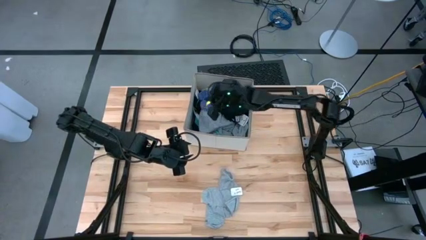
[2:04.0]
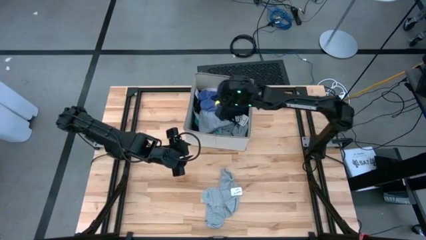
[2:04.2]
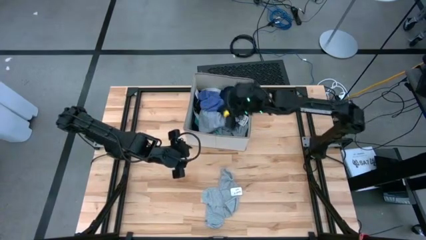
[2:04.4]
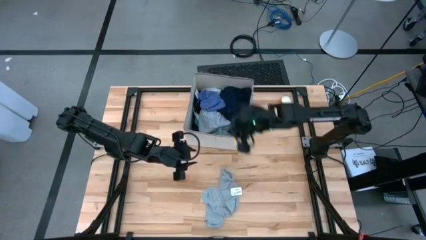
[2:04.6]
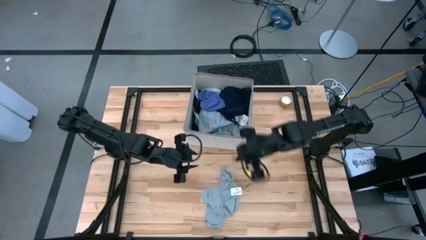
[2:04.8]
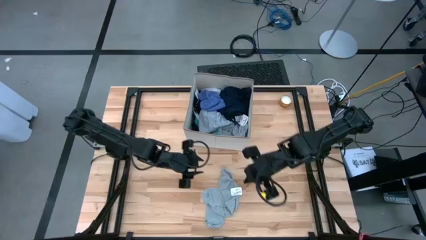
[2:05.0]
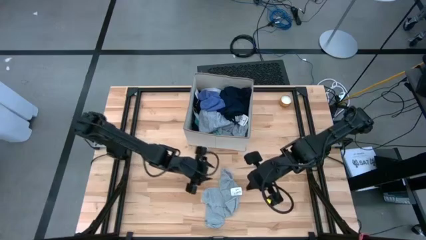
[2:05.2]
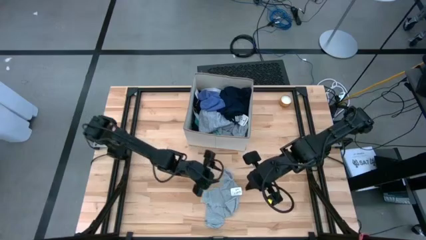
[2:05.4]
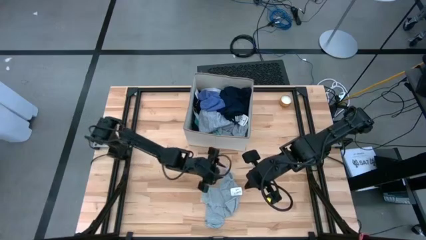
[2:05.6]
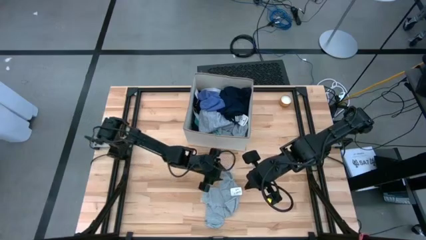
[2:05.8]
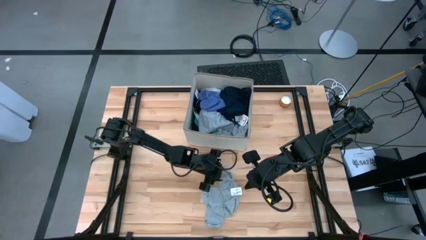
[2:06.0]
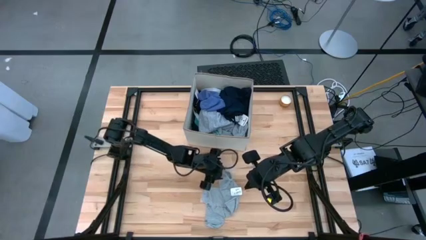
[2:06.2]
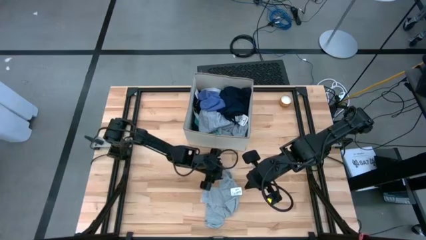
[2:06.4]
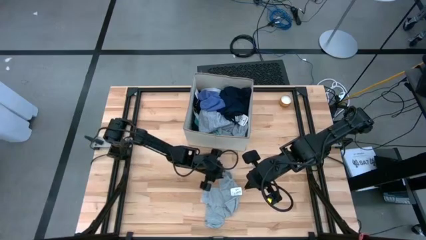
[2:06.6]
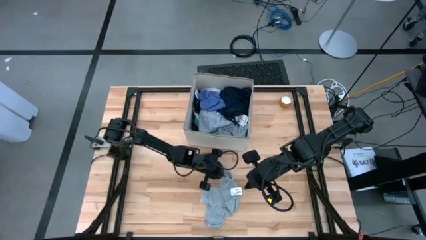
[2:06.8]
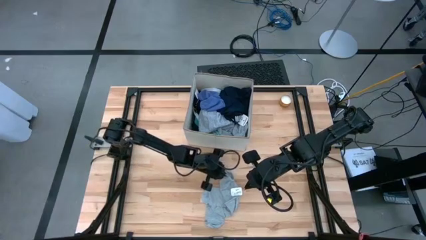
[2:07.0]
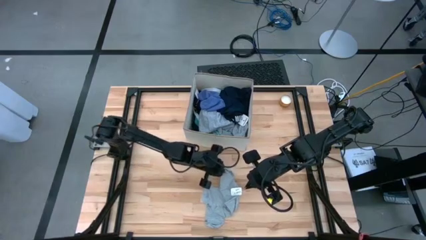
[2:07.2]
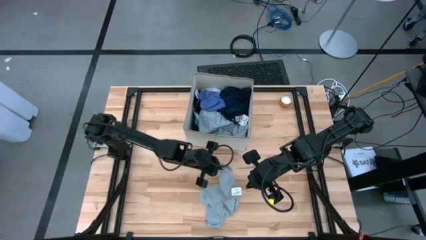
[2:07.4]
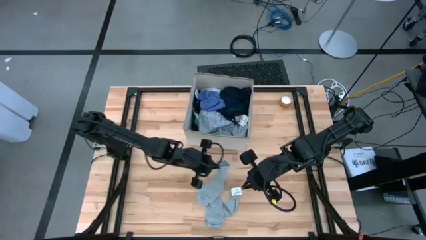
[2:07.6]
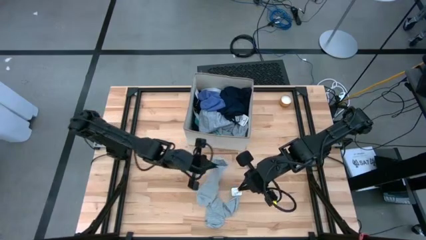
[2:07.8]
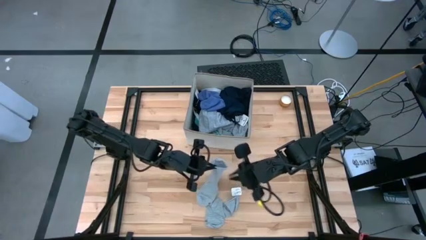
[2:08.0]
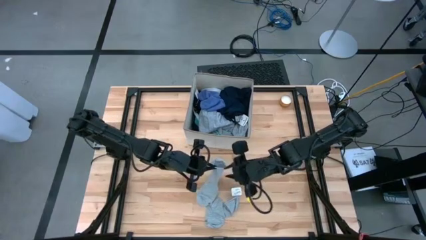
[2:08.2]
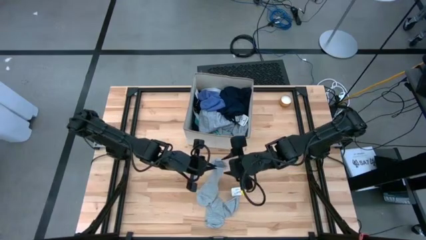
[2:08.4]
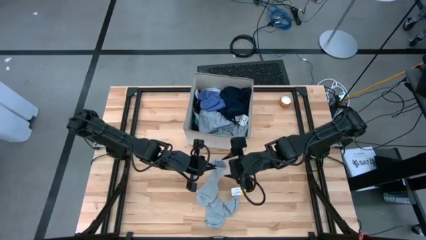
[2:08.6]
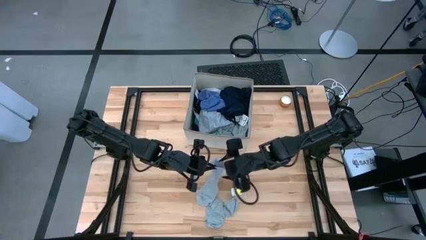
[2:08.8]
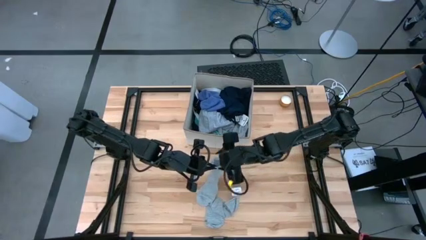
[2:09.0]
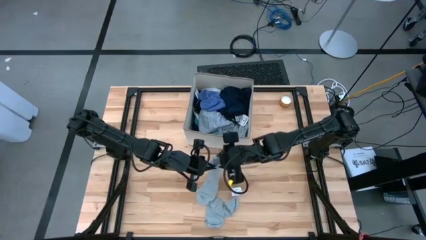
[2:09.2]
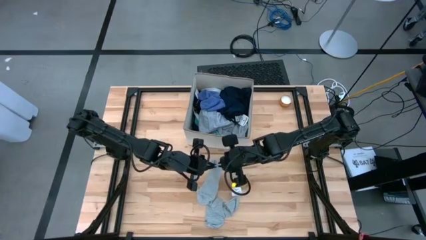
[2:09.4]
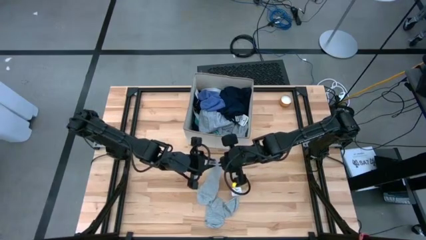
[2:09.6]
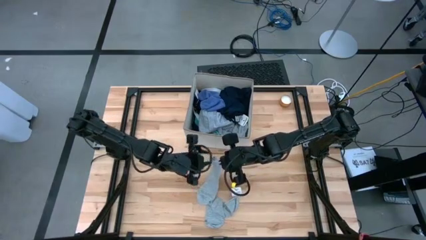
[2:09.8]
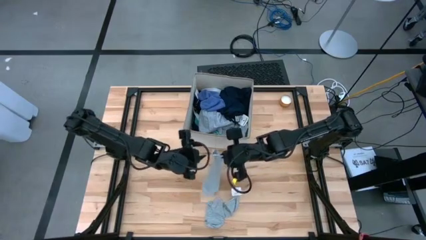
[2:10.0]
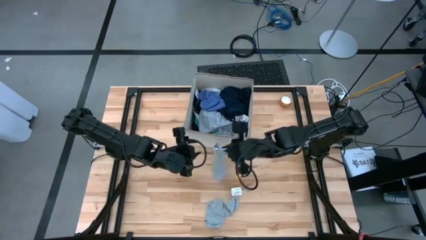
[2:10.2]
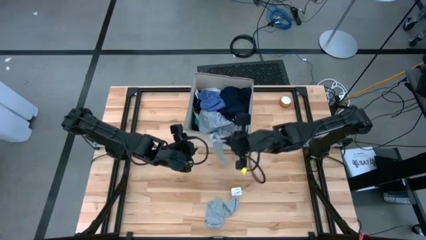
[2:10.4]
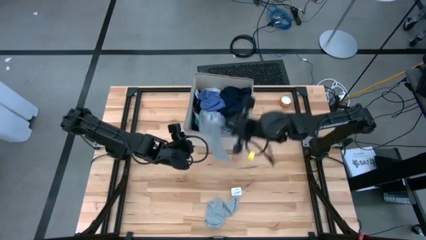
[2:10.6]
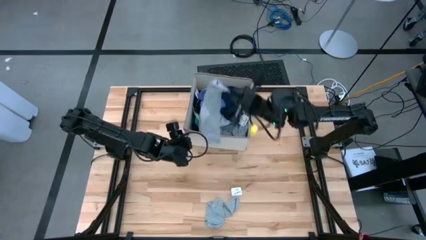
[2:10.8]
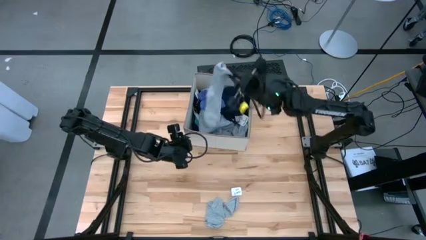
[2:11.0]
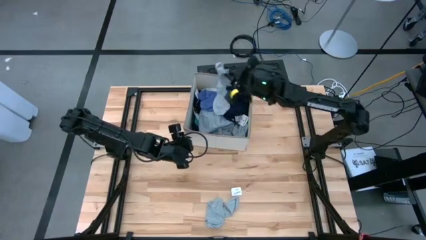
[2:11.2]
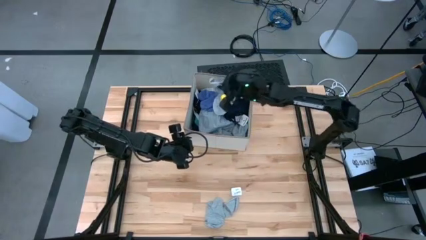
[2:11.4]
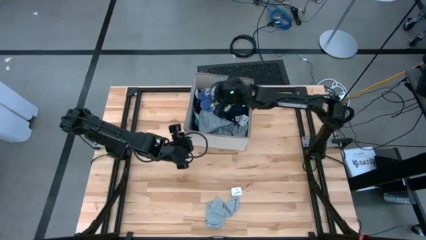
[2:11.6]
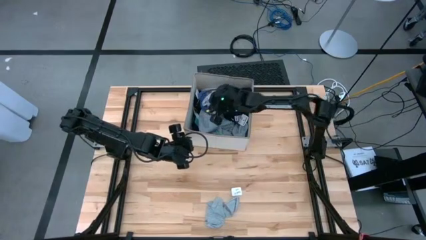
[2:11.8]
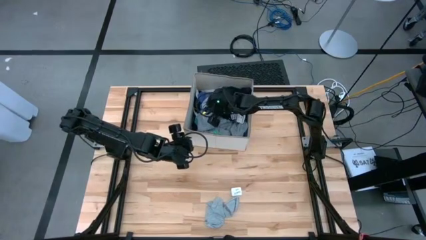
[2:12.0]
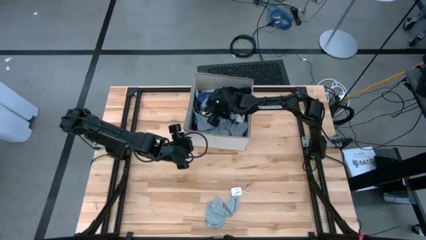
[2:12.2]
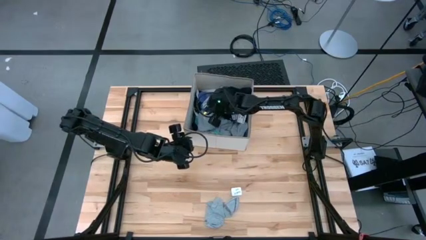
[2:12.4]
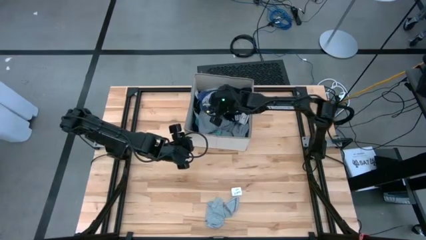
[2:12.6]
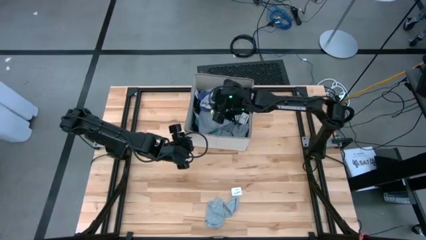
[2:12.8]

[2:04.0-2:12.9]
Task: Sort clothes
Put the top gray sock into the laundry bin

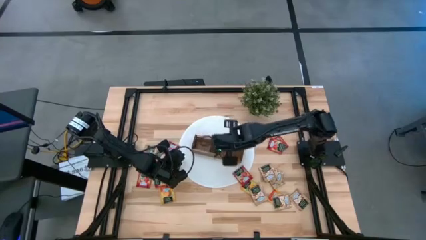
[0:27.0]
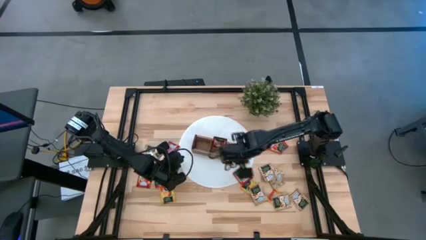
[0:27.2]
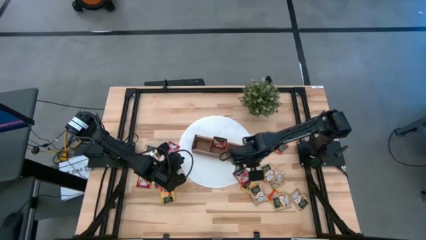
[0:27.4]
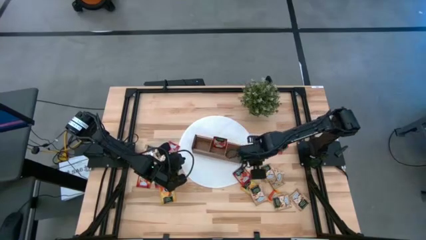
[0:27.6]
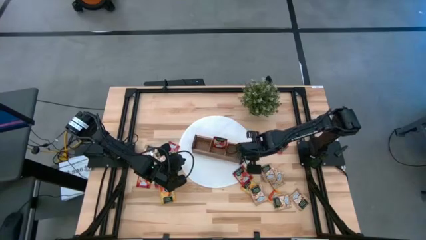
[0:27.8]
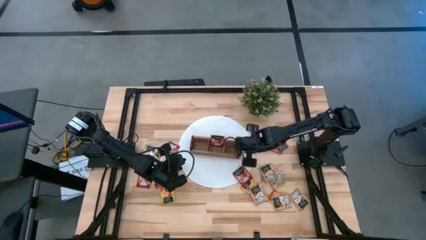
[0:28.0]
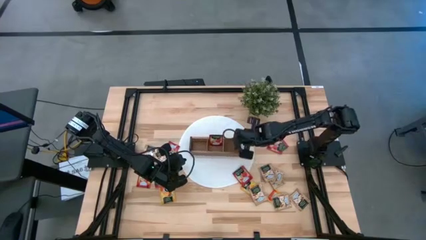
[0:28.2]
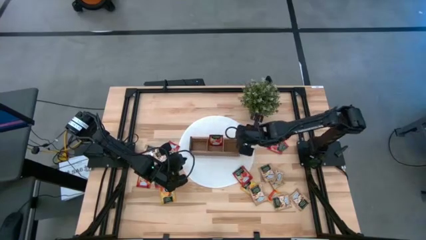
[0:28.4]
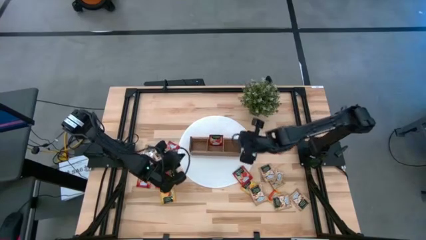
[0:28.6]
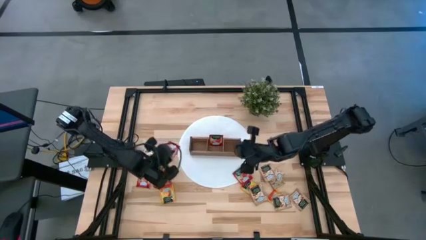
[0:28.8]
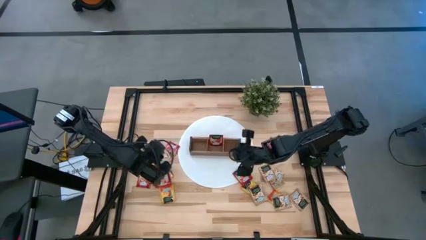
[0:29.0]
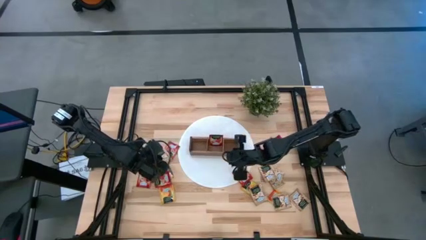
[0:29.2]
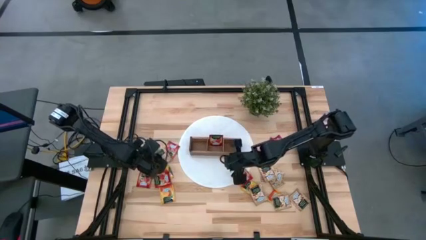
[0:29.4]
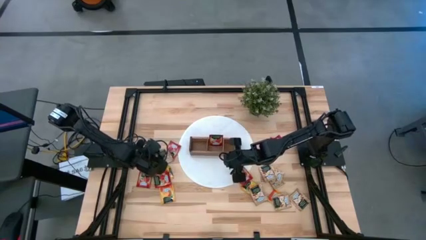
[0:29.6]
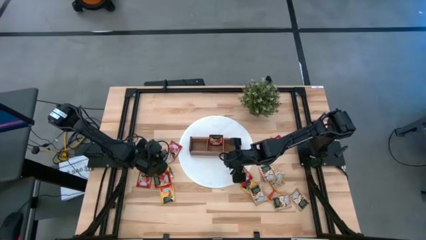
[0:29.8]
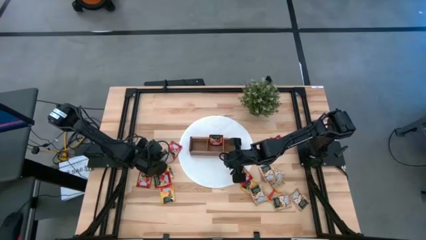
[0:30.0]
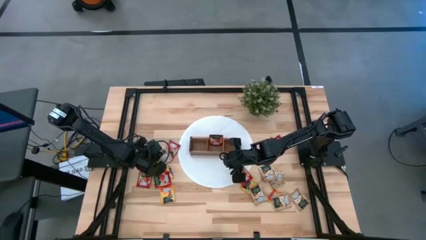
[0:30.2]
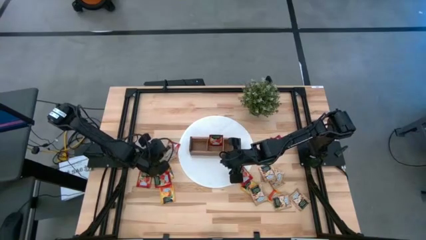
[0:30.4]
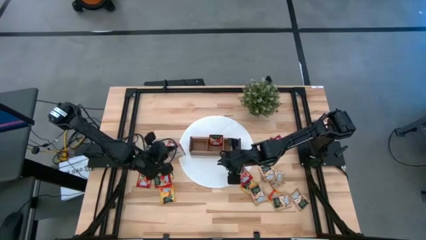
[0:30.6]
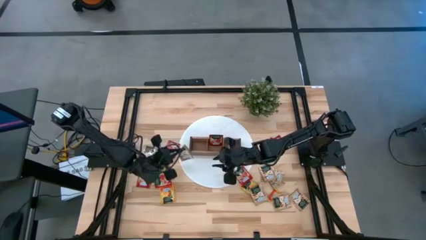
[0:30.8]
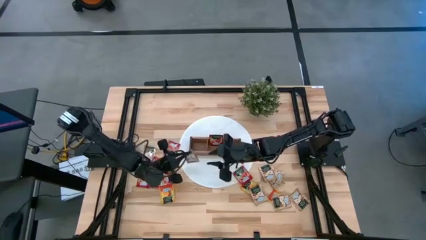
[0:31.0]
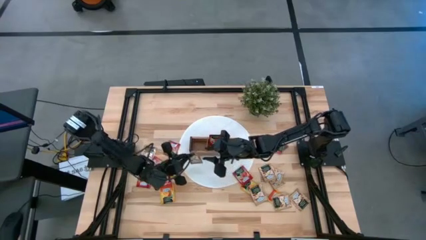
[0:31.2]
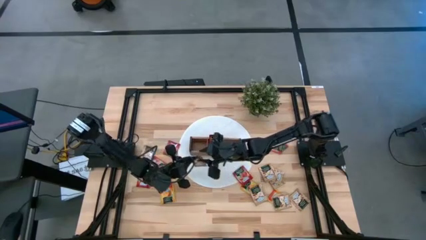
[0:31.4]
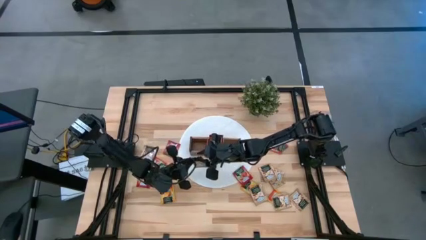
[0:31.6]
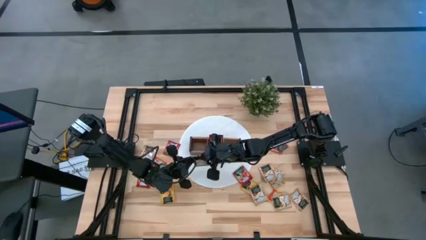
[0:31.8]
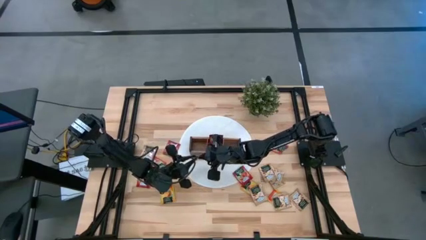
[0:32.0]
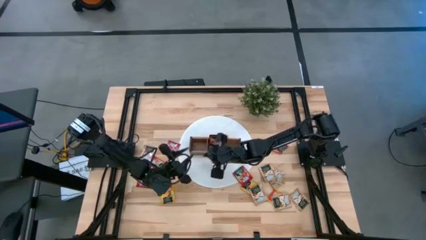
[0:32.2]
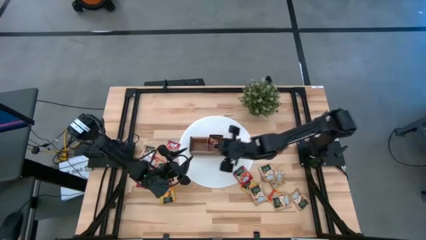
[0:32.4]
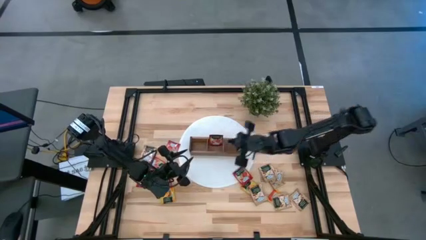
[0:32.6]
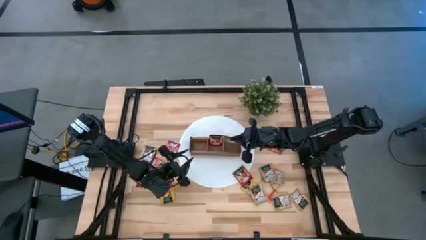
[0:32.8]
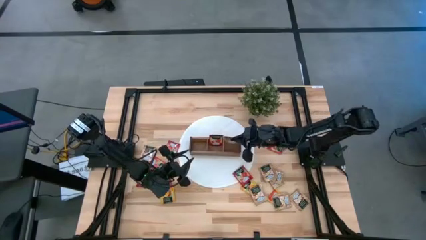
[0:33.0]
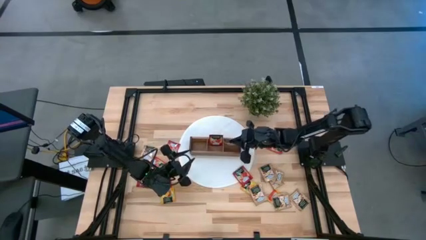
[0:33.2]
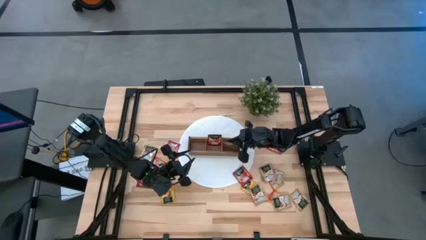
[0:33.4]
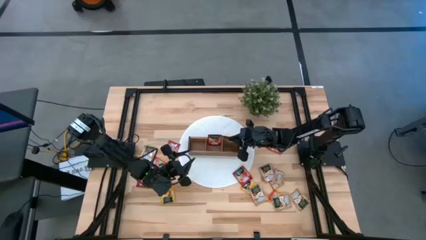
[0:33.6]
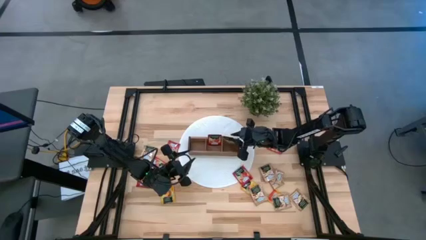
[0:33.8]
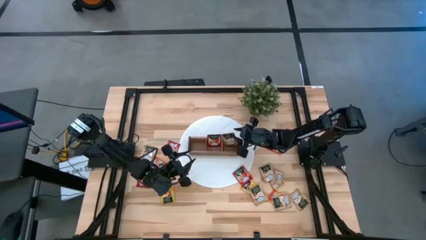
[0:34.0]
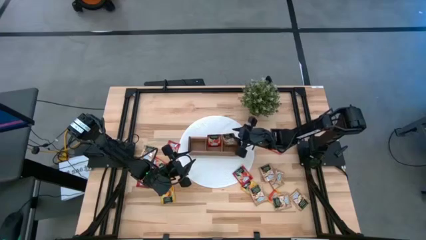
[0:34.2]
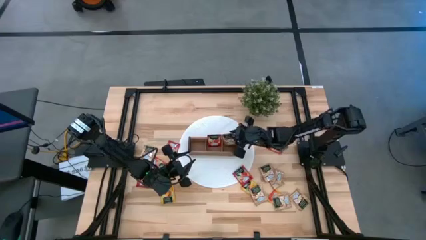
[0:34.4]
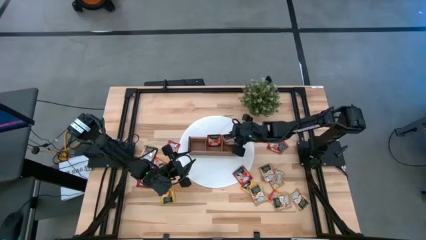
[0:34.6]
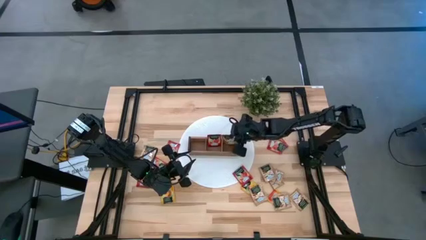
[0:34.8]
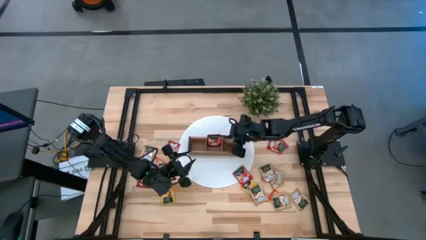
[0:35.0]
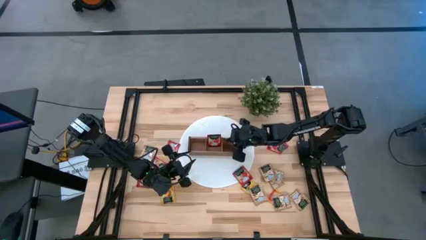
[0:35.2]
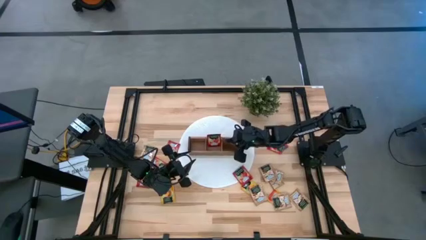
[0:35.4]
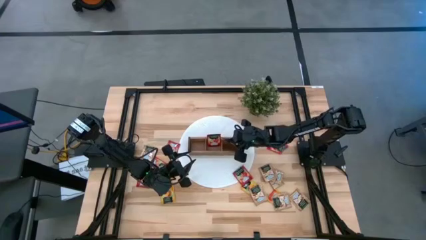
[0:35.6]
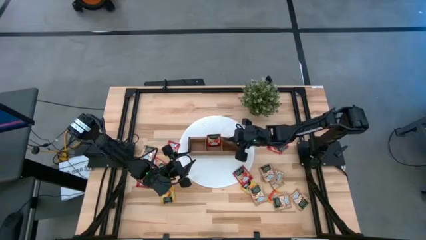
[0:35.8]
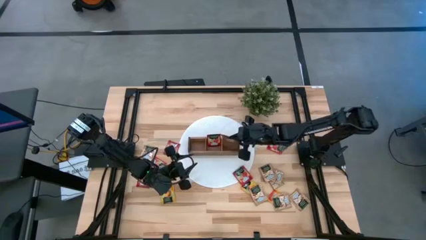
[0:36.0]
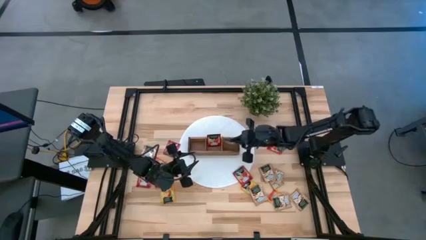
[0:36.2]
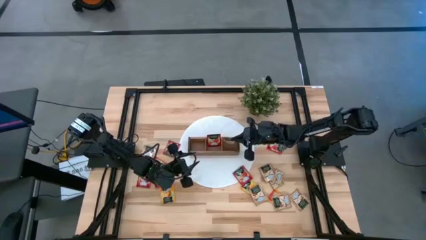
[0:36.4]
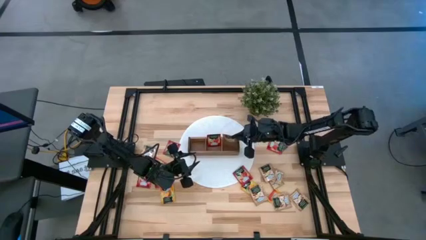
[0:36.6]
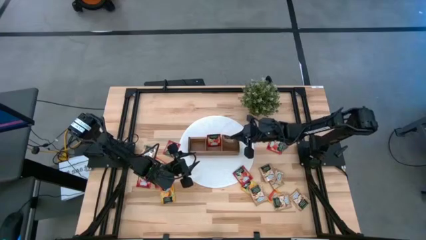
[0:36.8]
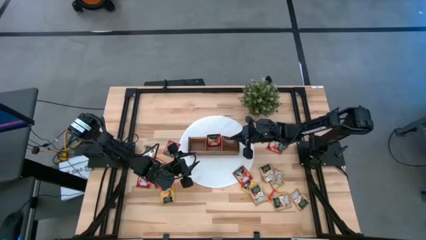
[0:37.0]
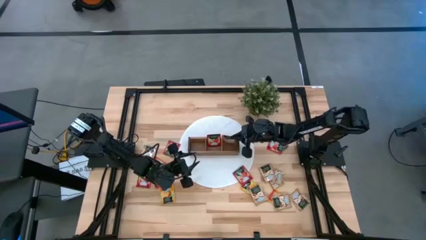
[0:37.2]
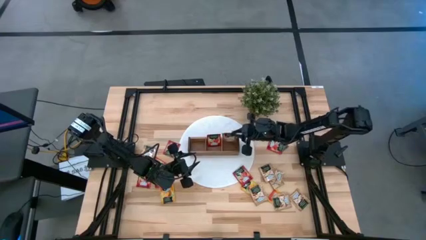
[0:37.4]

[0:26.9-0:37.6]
Task: Pick & Place Tea
Put the brown tea bag into the right section of the wooden organizer
